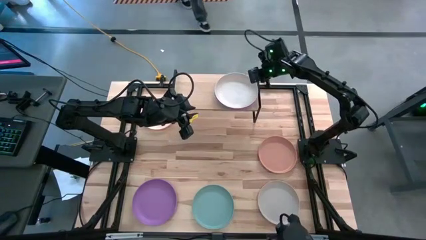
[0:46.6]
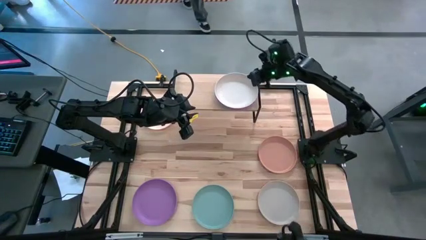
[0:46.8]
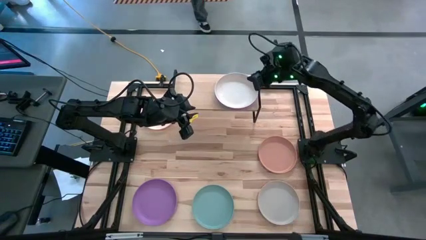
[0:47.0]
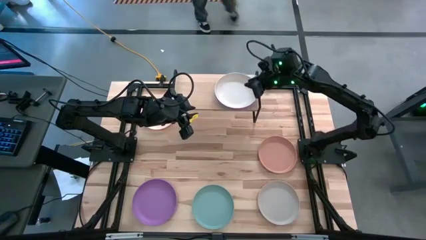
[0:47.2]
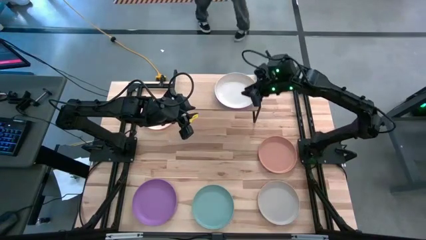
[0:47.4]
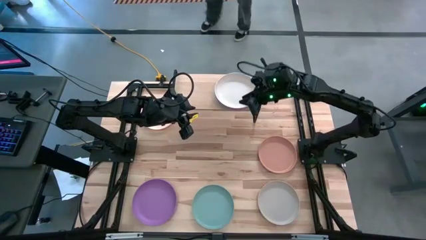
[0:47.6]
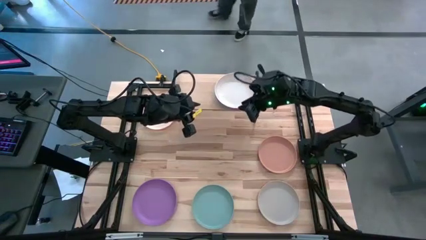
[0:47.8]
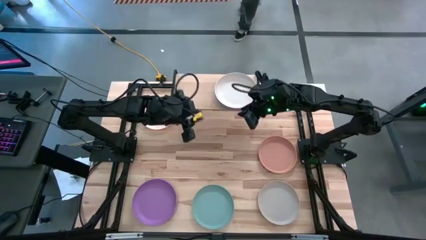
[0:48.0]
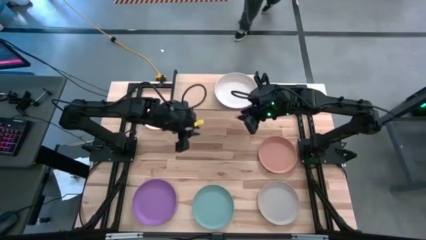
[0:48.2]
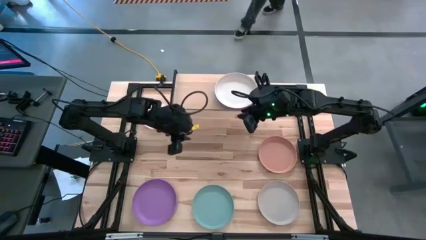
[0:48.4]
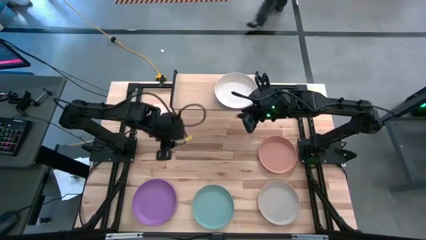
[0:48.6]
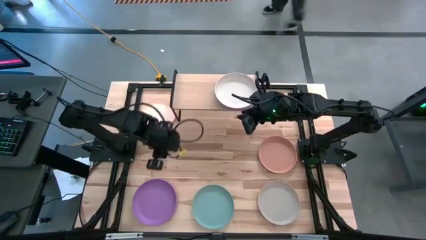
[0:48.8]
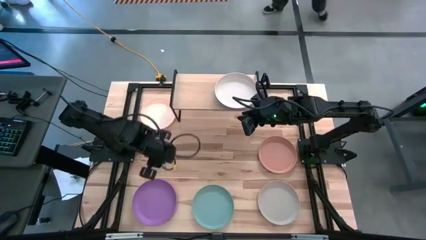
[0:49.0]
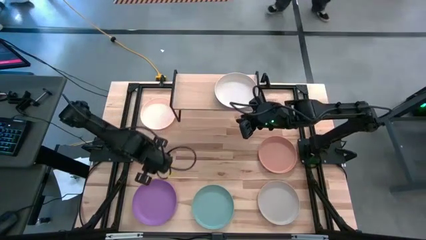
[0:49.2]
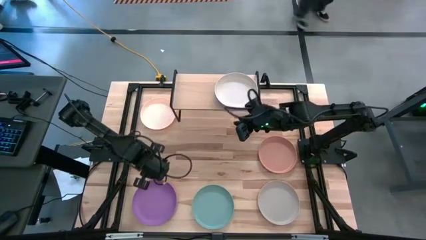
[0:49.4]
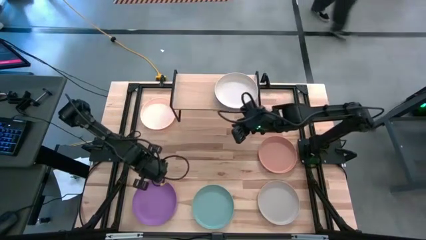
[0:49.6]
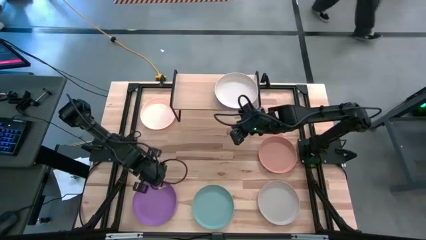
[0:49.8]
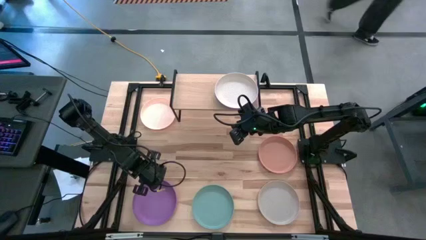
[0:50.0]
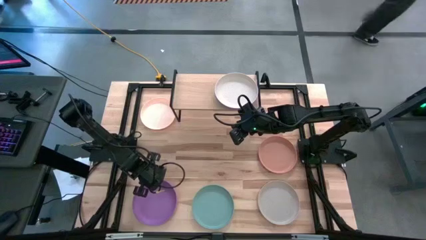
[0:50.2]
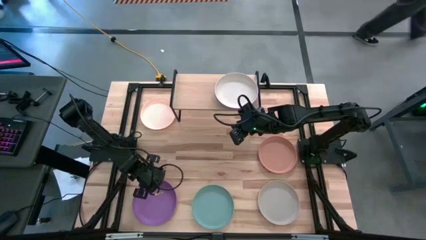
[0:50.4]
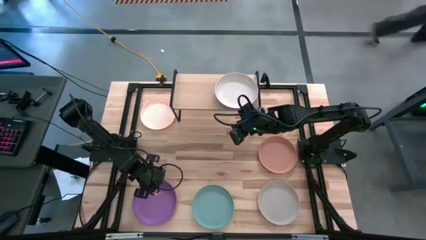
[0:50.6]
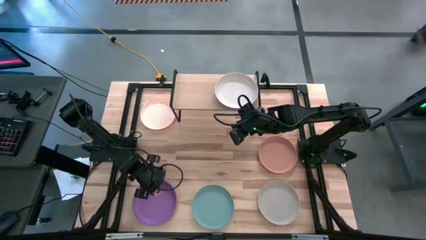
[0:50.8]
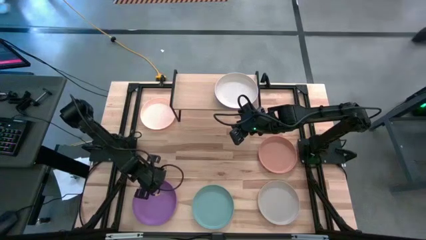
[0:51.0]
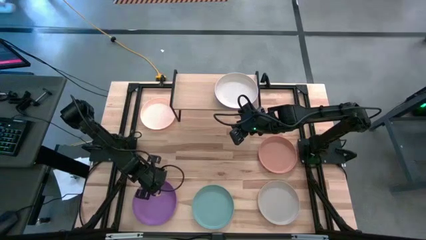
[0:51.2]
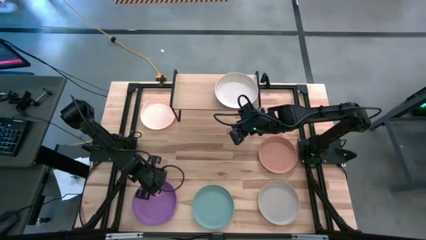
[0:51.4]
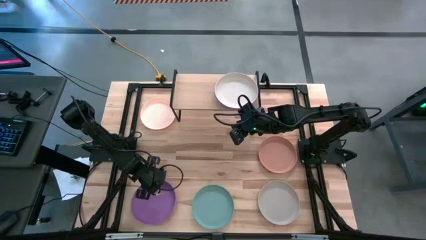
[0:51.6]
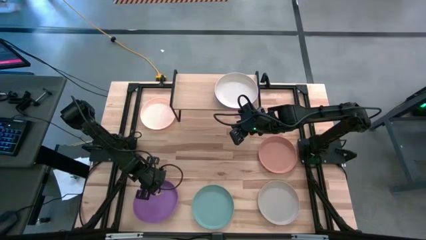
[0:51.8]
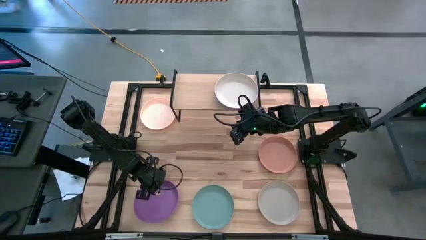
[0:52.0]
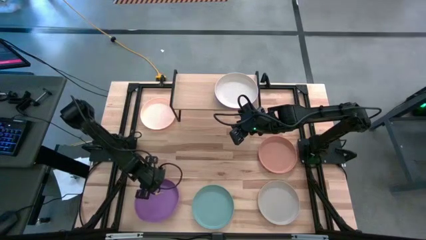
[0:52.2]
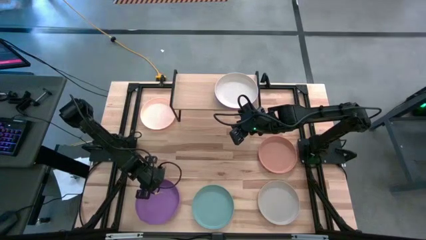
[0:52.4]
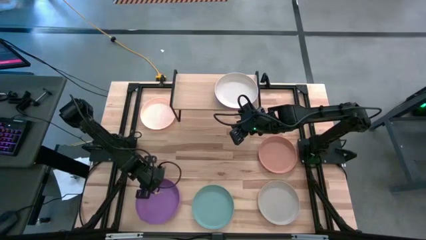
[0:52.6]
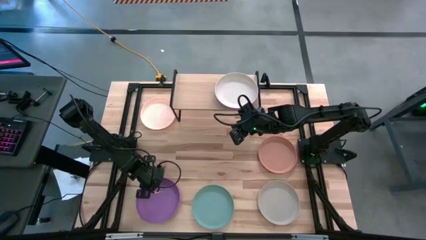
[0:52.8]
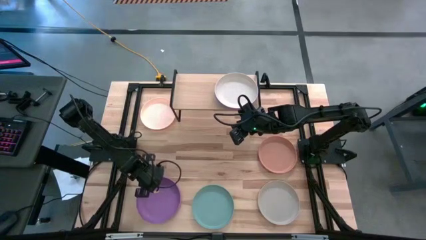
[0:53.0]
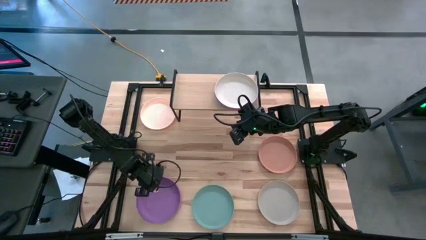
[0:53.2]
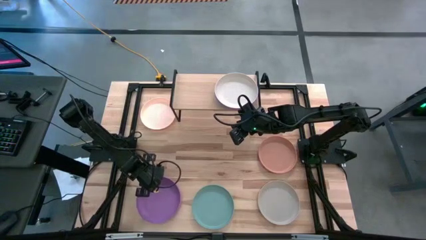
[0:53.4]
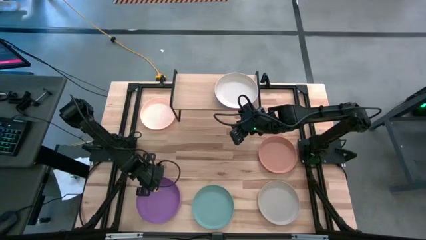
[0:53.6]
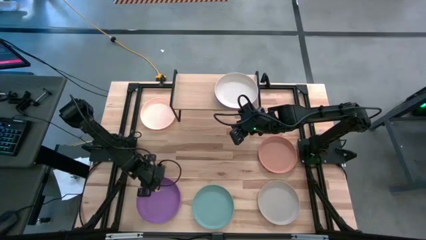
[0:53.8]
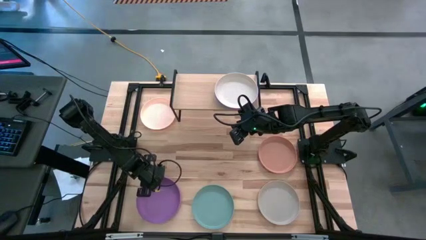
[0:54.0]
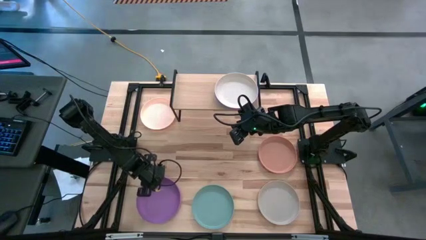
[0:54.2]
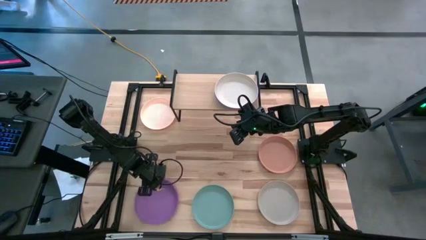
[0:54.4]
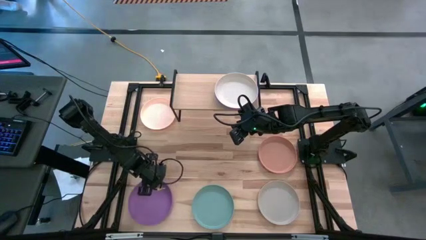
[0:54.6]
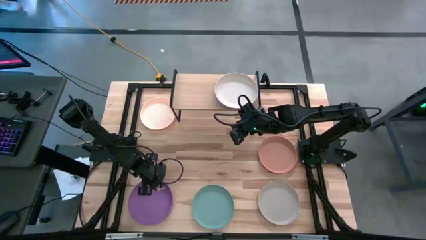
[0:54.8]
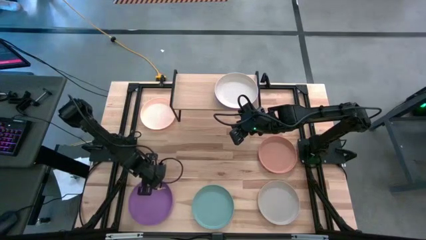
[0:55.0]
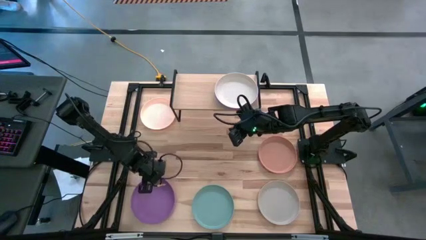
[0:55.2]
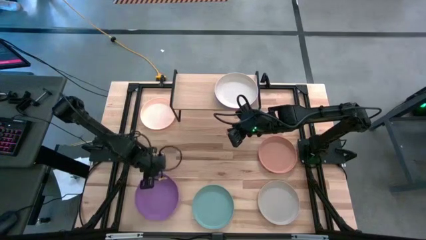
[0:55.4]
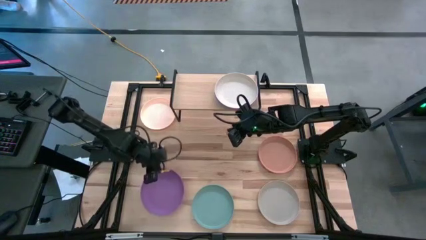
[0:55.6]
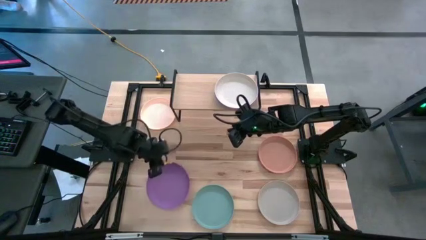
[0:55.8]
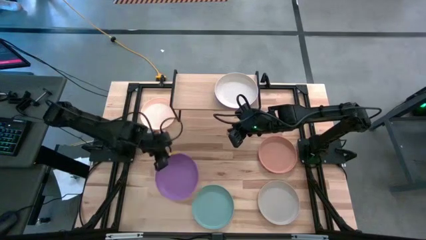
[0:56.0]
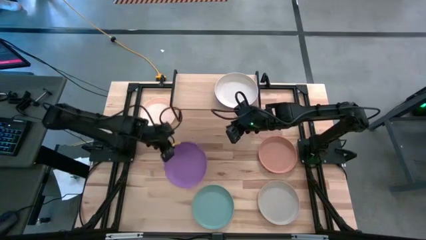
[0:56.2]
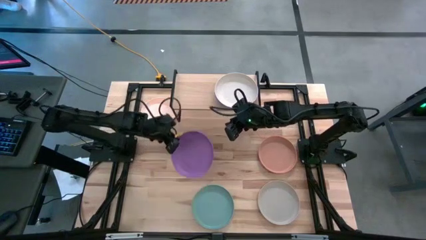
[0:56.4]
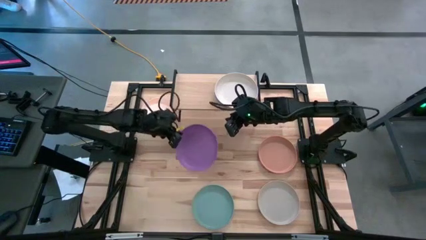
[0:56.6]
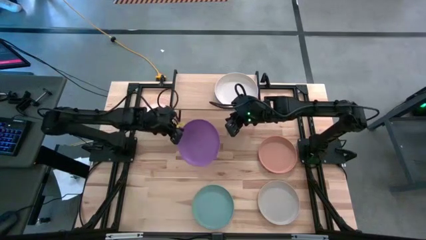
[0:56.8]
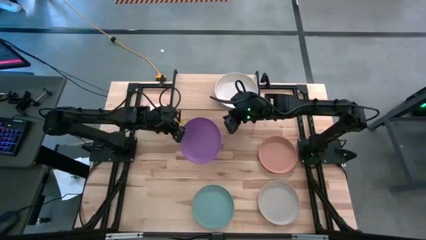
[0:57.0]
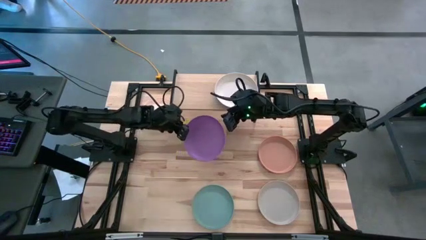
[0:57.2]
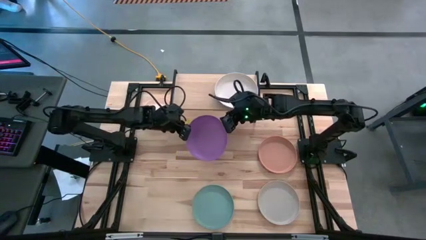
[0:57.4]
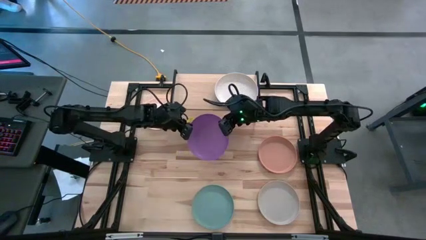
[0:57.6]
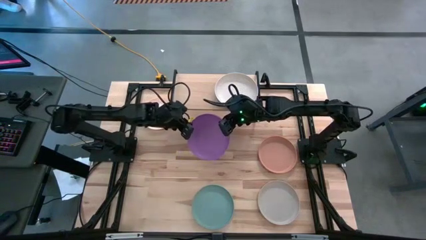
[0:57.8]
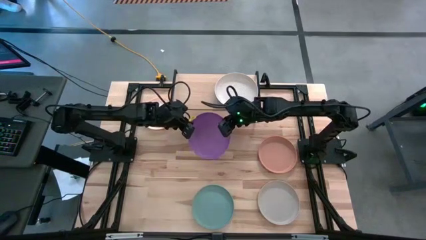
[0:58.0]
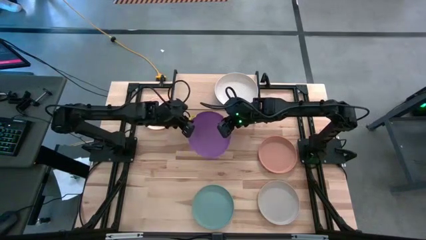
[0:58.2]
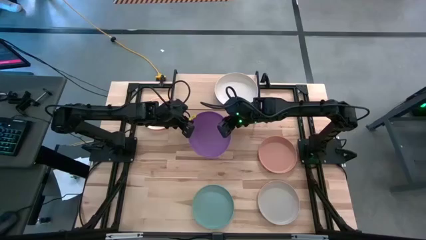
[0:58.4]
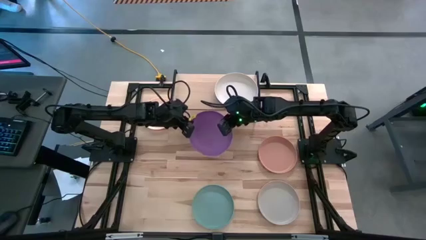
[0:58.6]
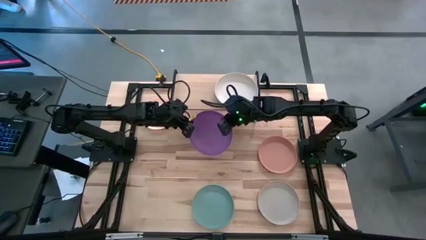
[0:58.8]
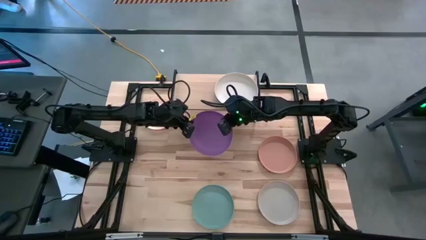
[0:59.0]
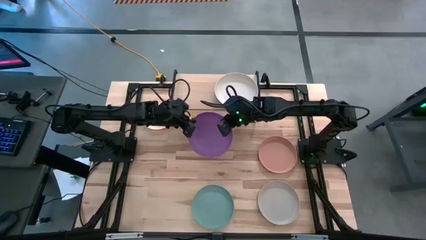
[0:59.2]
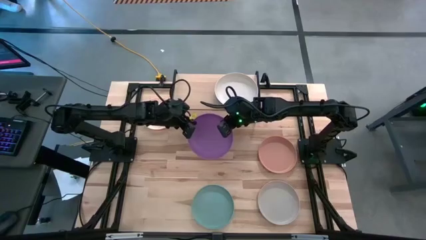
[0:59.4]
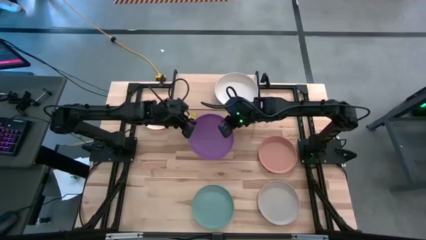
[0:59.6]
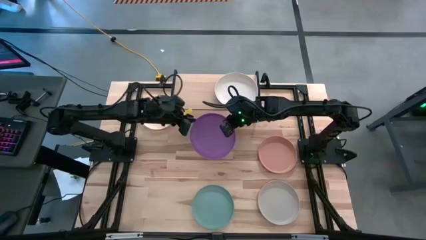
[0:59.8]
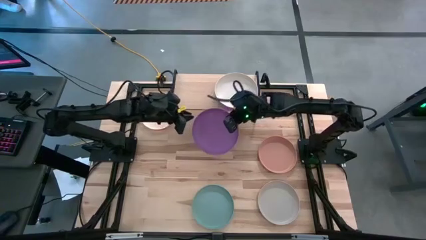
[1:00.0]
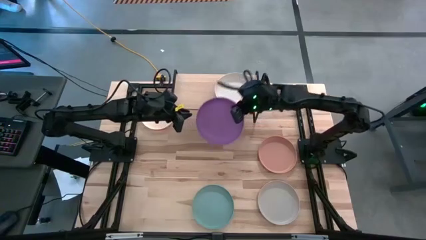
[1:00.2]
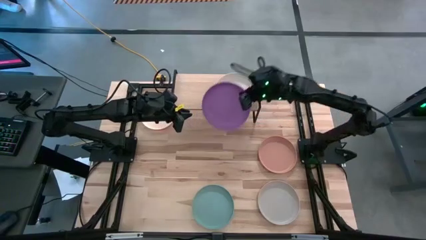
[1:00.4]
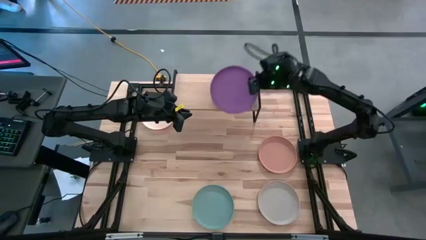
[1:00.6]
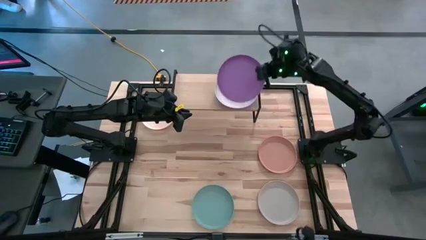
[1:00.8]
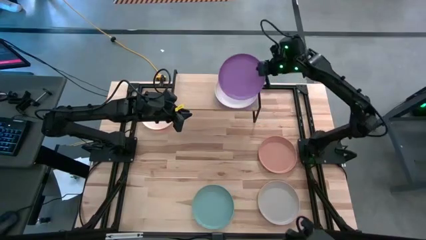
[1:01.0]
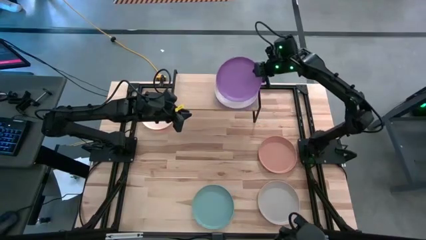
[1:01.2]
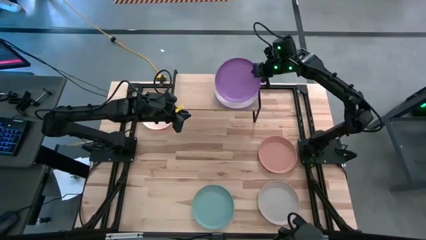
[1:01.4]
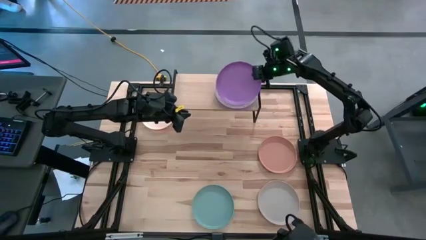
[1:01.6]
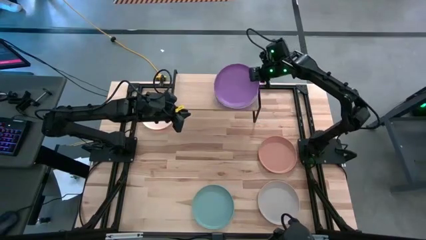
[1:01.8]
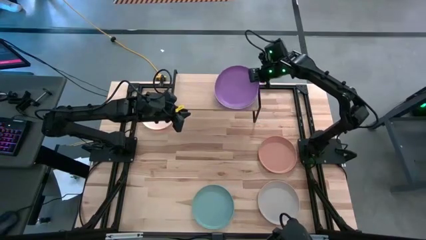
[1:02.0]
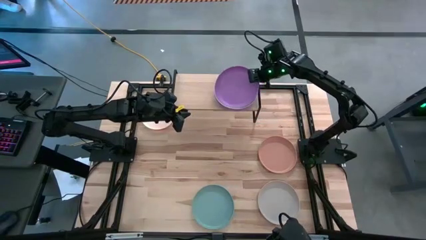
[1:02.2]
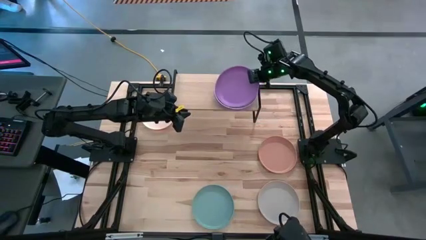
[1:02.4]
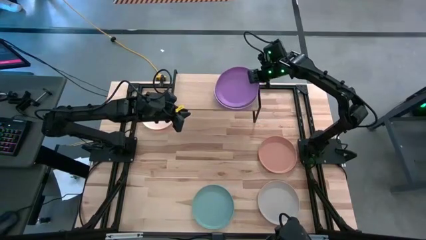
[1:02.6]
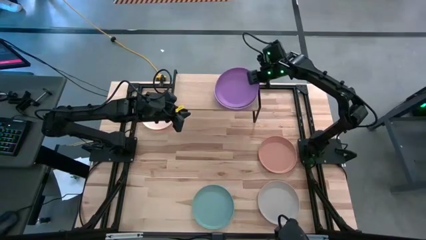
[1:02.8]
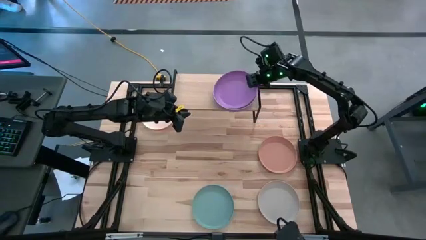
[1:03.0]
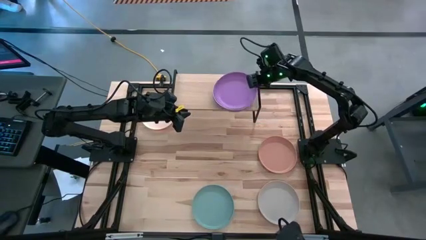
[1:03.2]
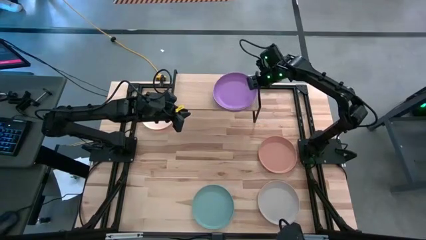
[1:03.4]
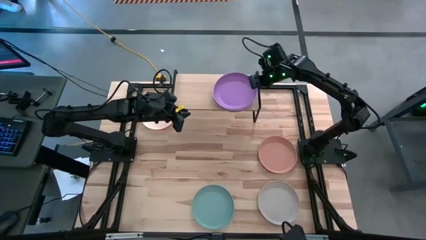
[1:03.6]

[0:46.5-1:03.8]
Task: Place and stack plates onto a shelf
Stack the violet plate on top of the white plate on the shelf
